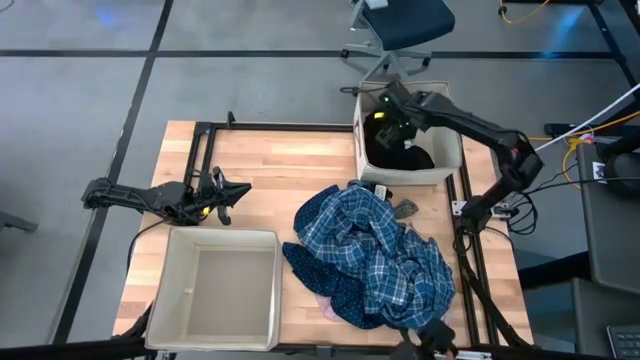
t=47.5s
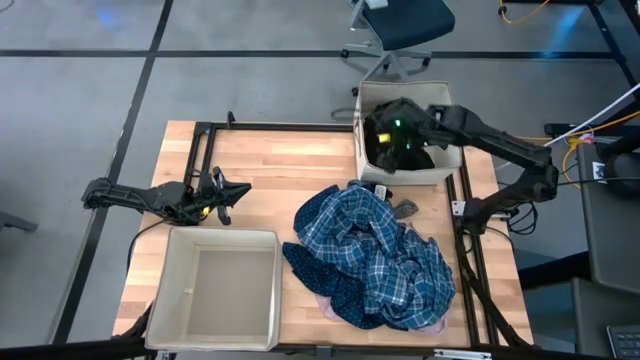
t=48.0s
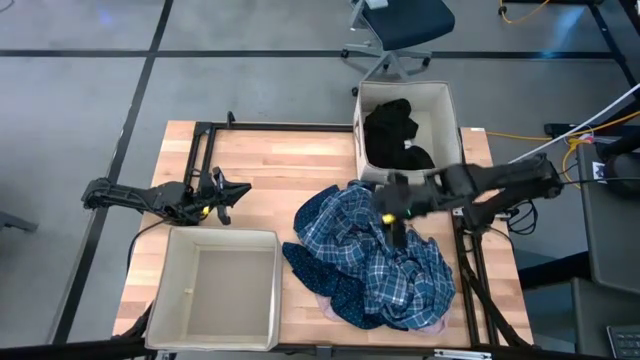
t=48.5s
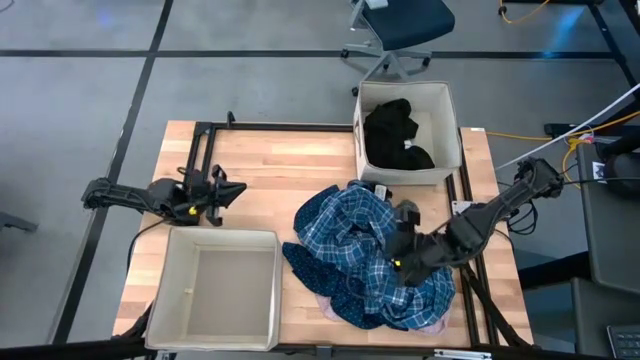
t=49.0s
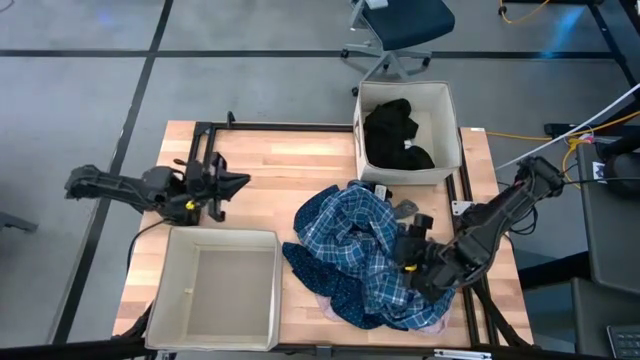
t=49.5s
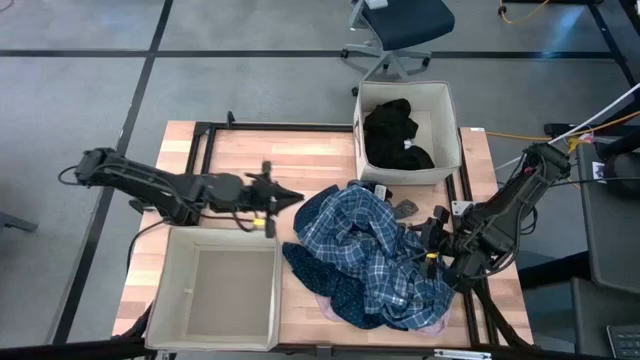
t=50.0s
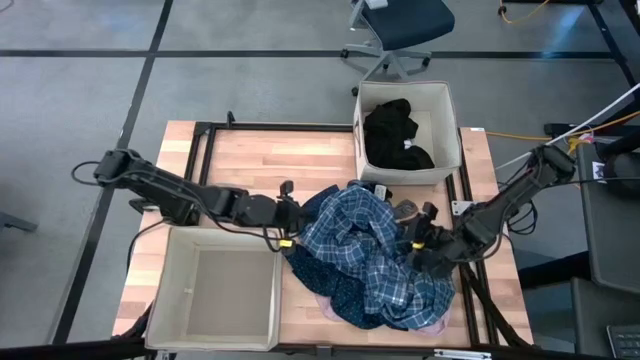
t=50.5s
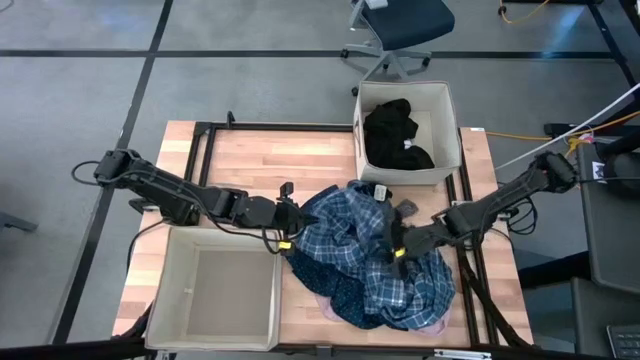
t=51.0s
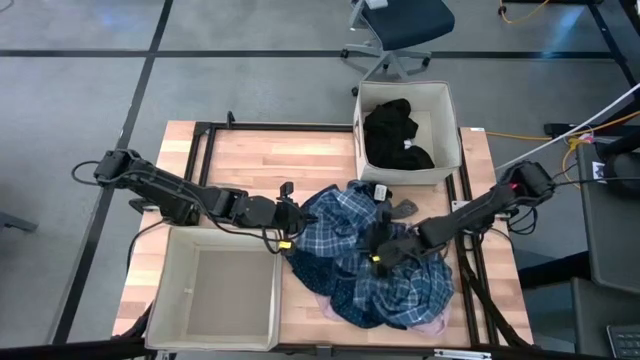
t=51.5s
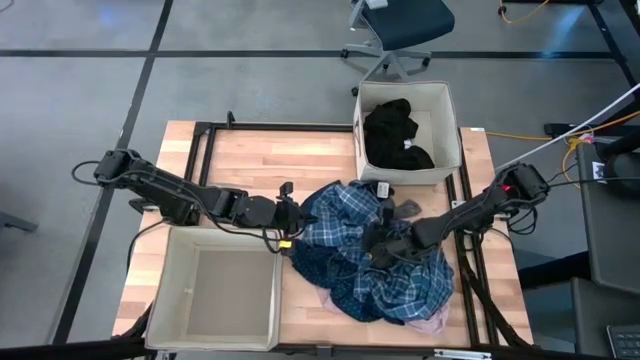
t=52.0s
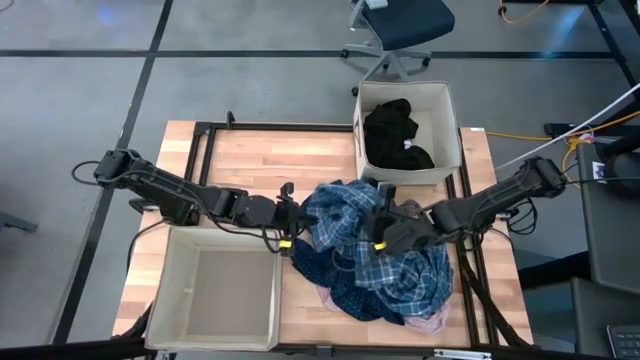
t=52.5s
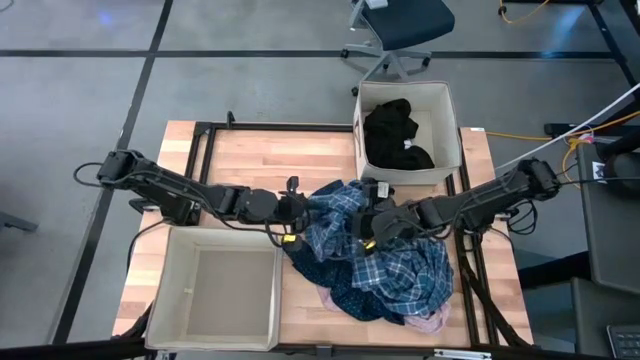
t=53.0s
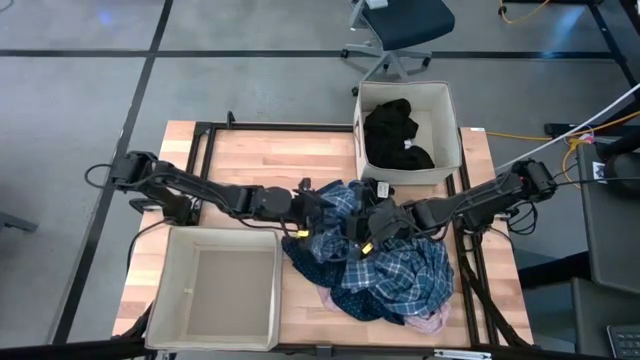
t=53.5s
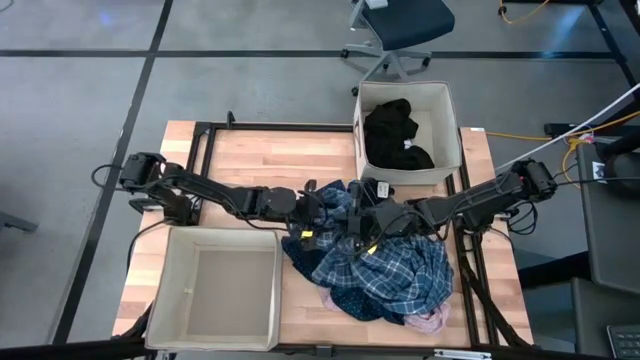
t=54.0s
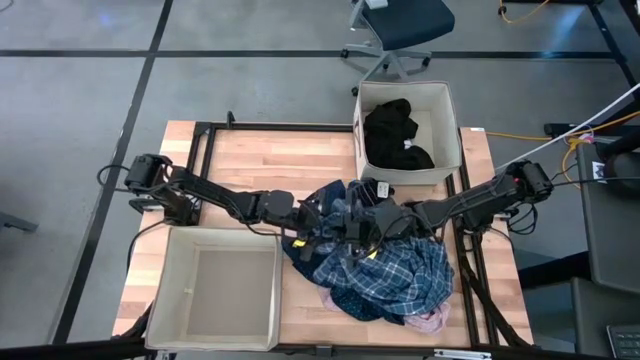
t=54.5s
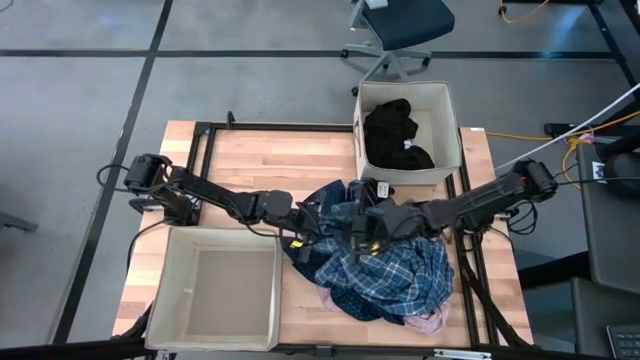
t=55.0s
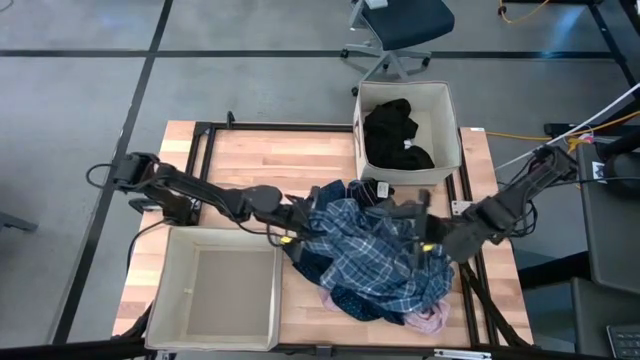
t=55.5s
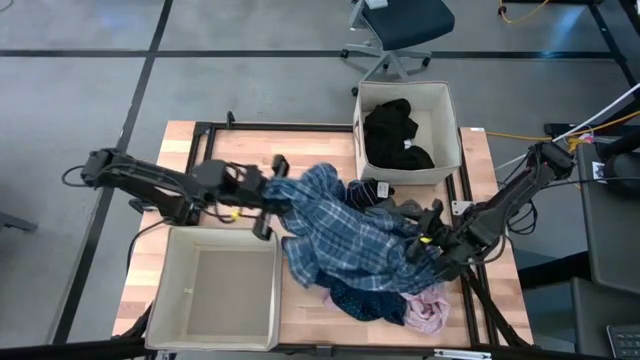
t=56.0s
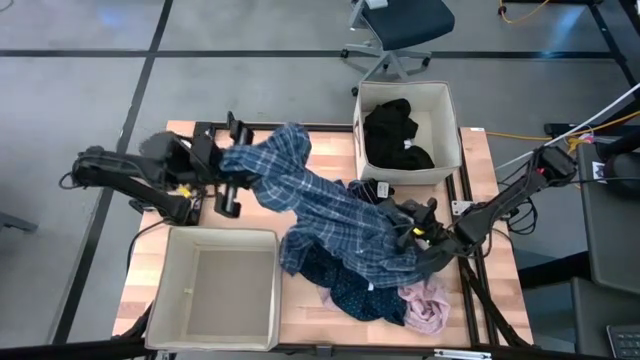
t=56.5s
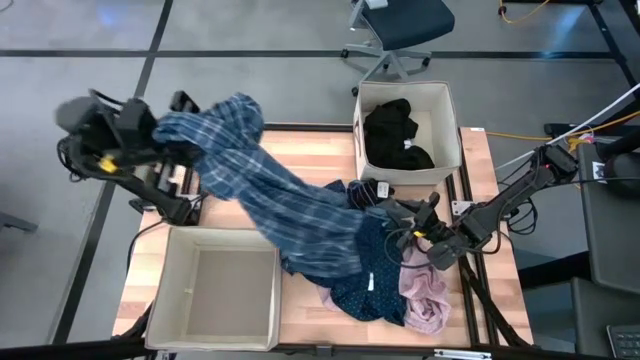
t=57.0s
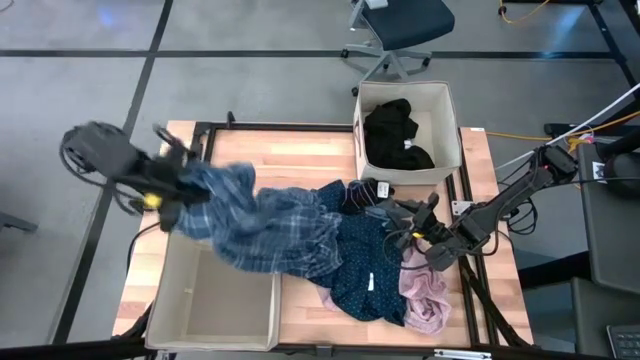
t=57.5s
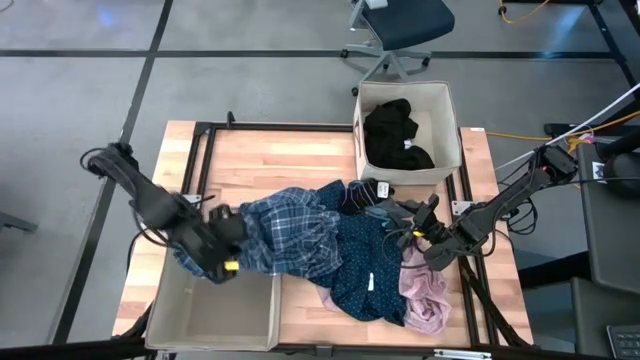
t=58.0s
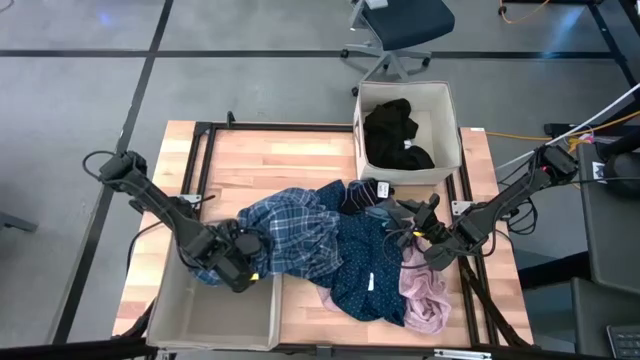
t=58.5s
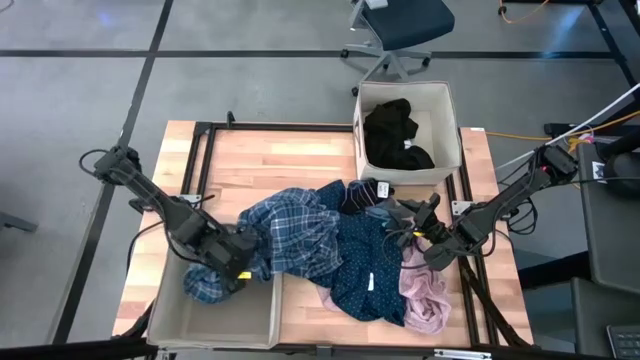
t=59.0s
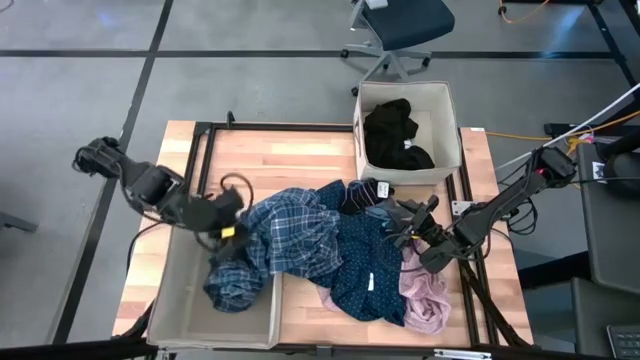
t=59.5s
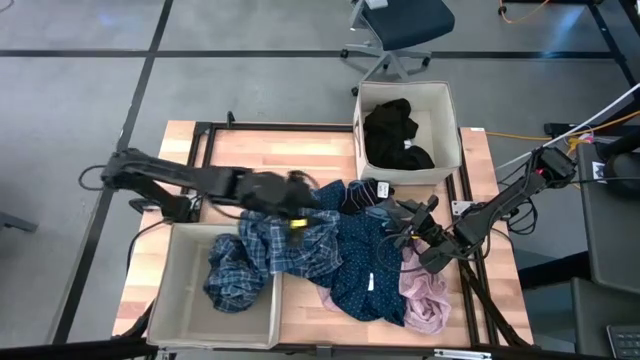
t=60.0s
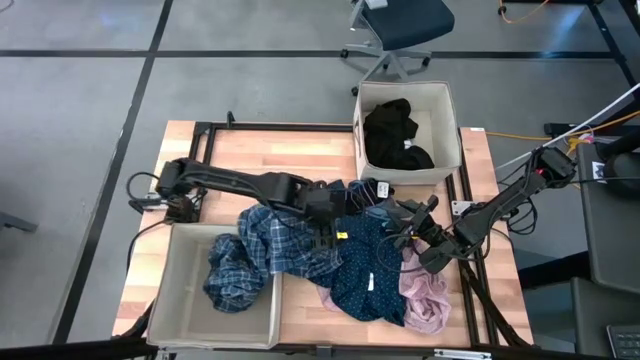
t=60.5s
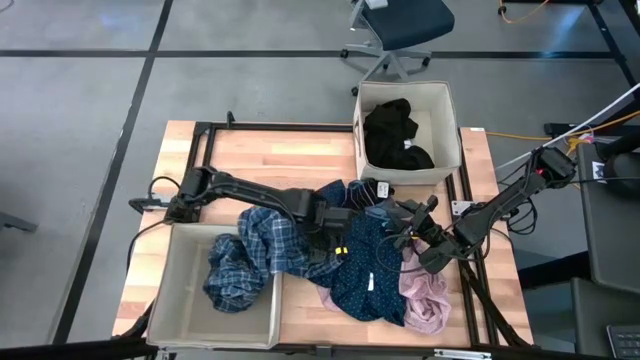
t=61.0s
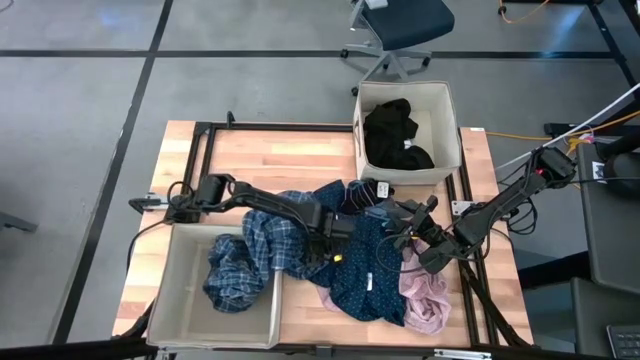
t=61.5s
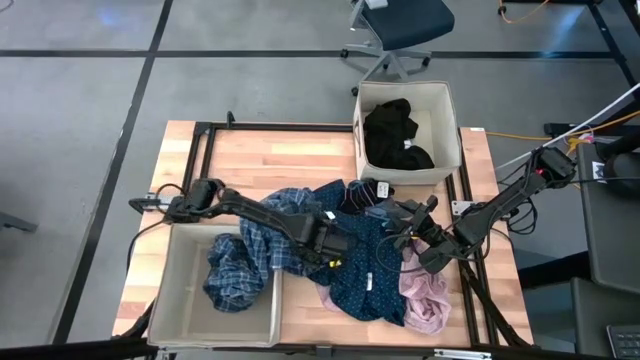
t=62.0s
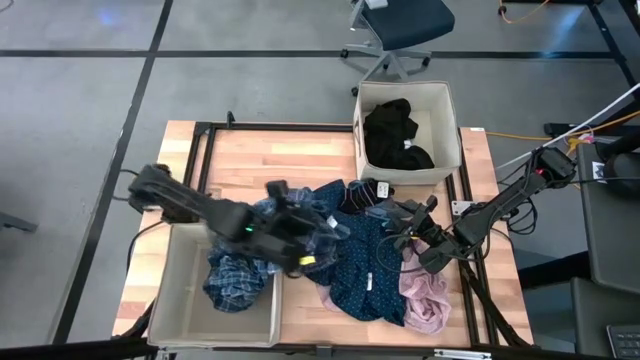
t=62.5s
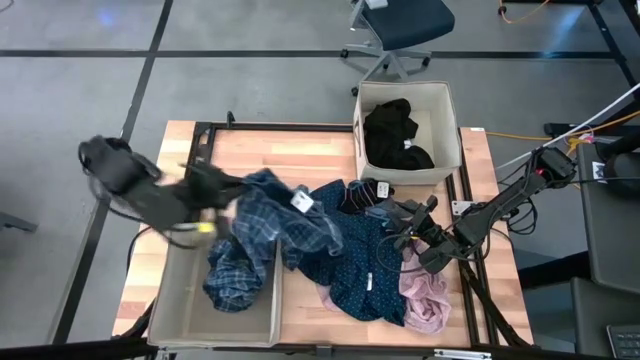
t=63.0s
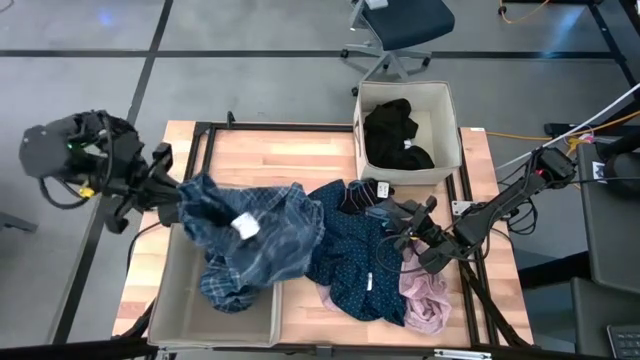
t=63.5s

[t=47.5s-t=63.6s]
Task: Sort clothes
Put the blue pants into the bottom laundry organizer

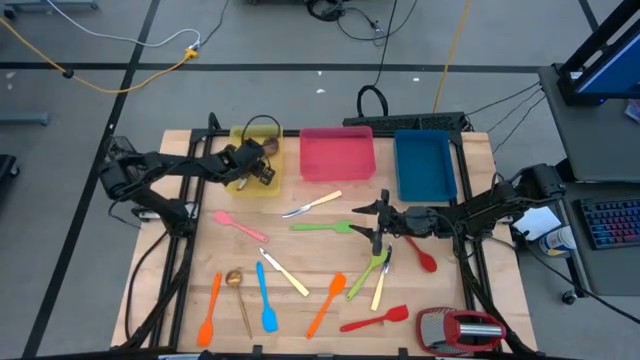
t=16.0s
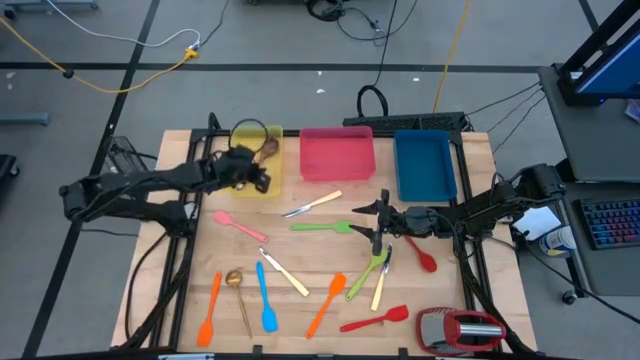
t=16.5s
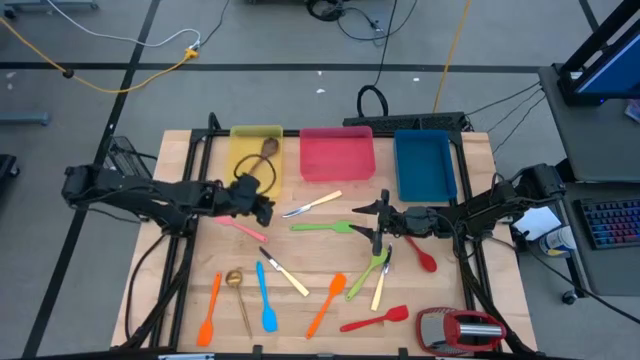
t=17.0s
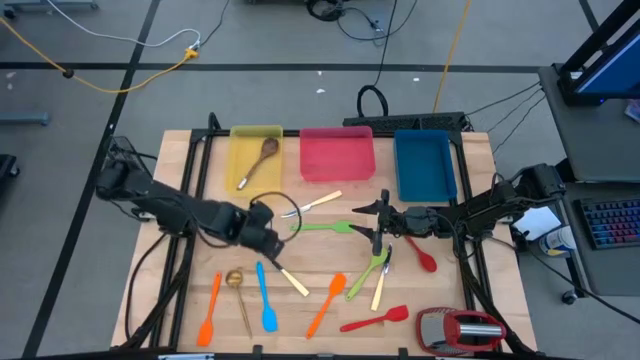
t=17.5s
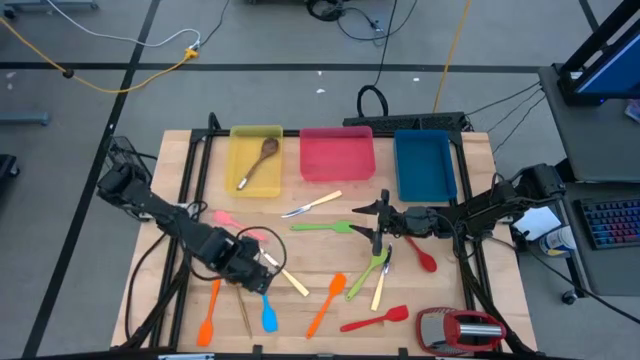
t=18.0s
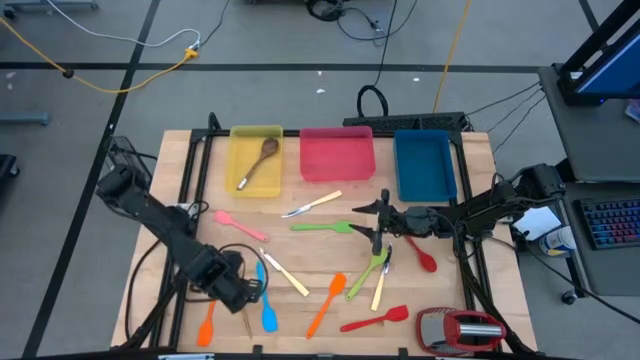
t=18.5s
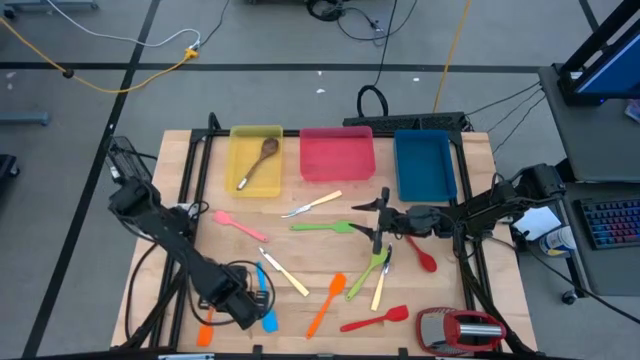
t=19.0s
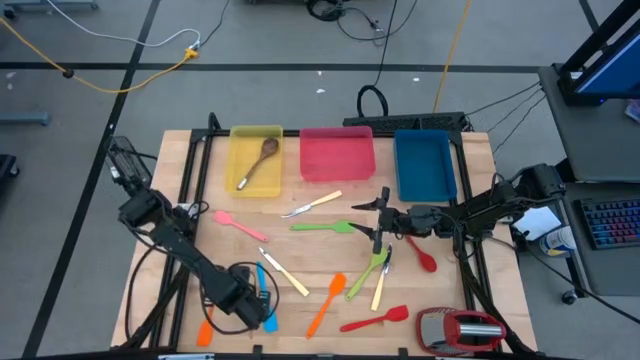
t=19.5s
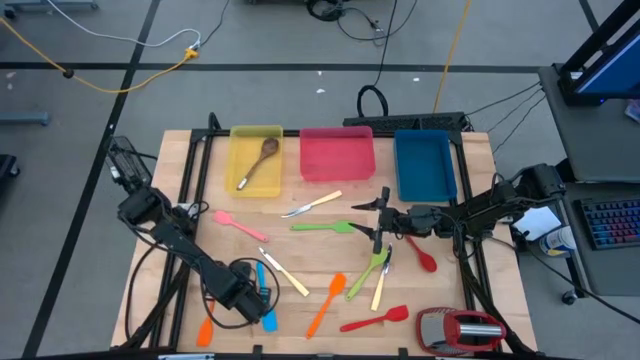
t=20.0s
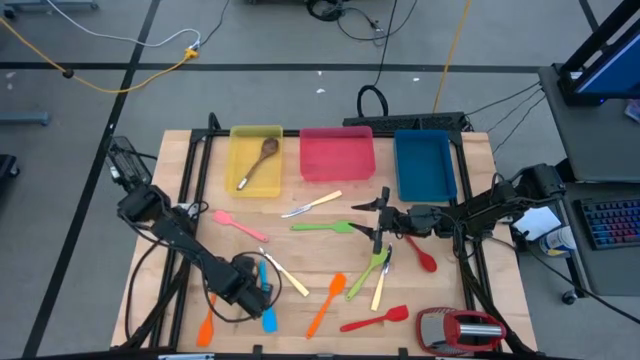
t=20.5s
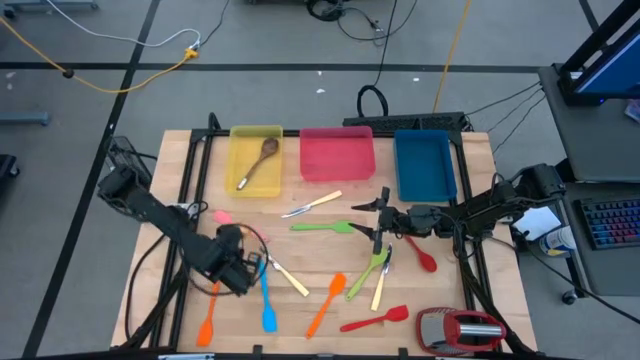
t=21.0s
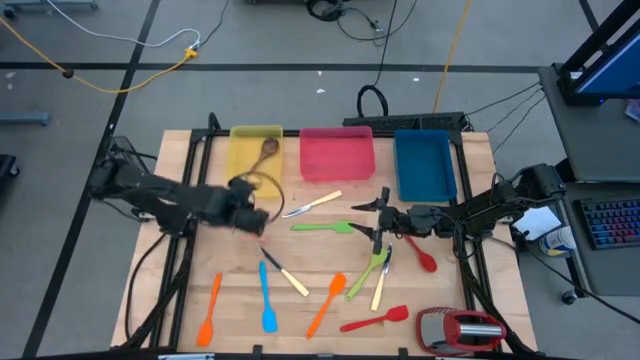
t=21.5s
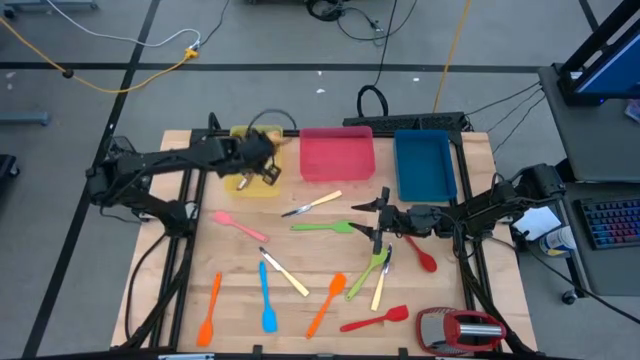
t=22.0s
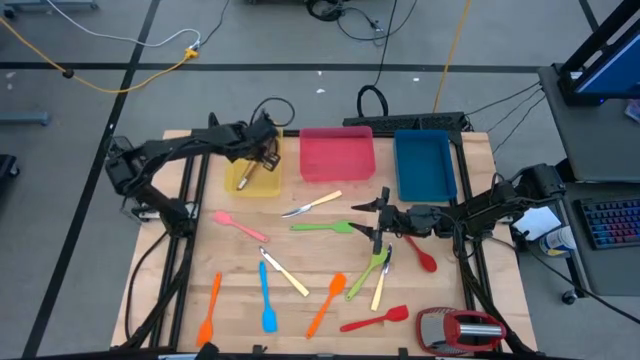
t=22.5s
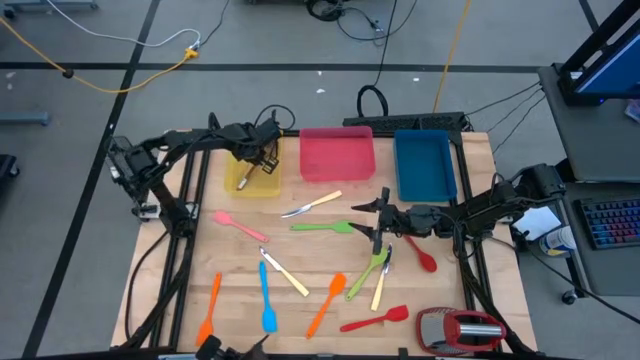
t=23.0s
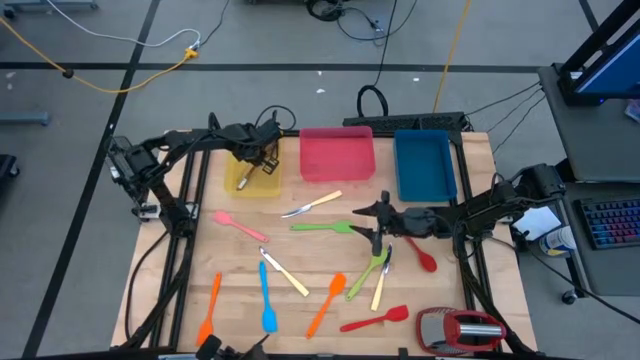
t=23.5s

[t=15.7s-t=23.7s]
Task: Pick & Place Kitchen Items
Put the gold serving spoon into the yellow bin
